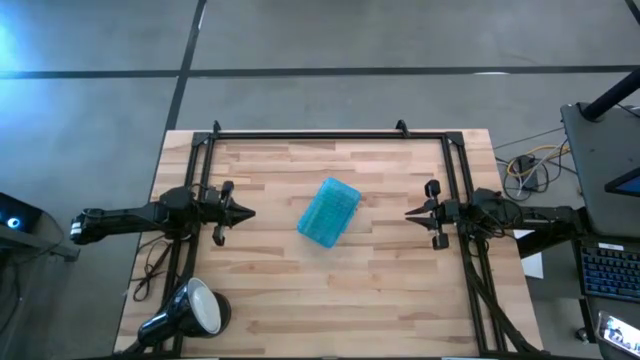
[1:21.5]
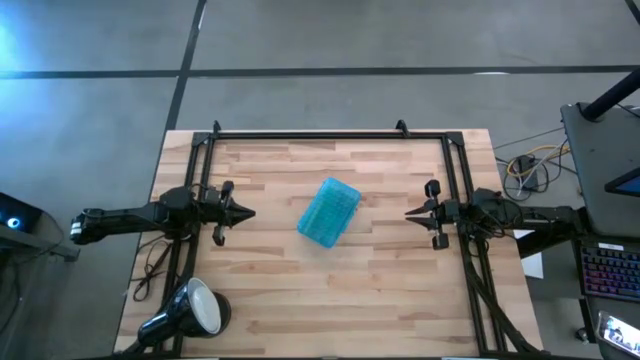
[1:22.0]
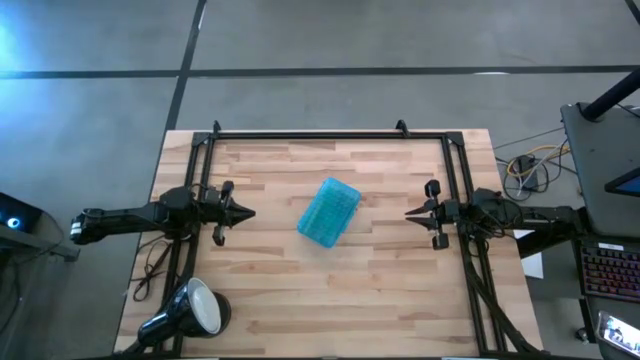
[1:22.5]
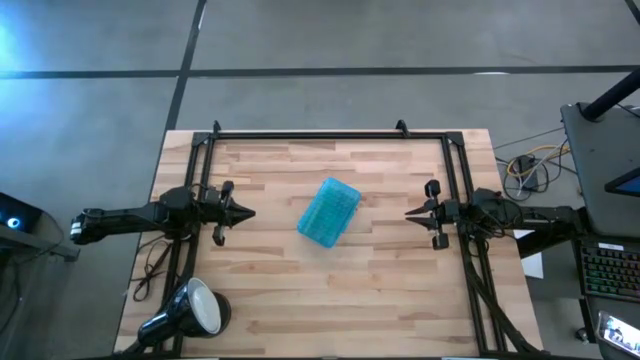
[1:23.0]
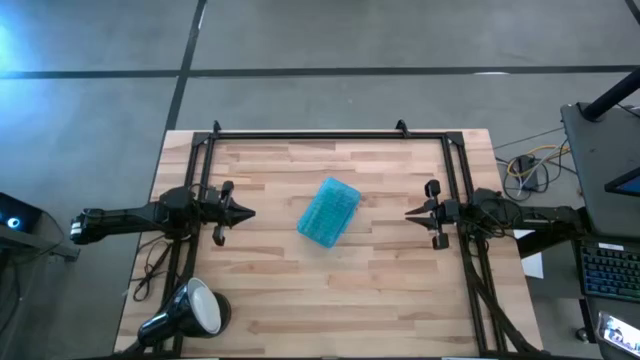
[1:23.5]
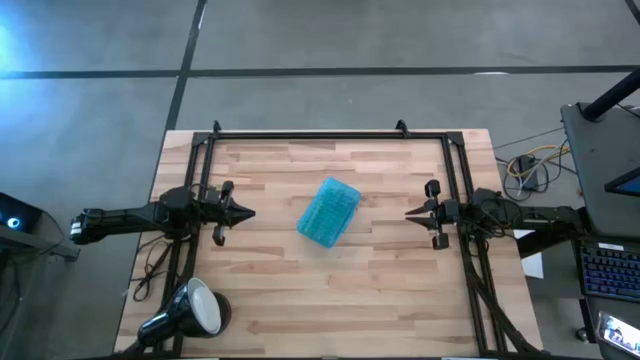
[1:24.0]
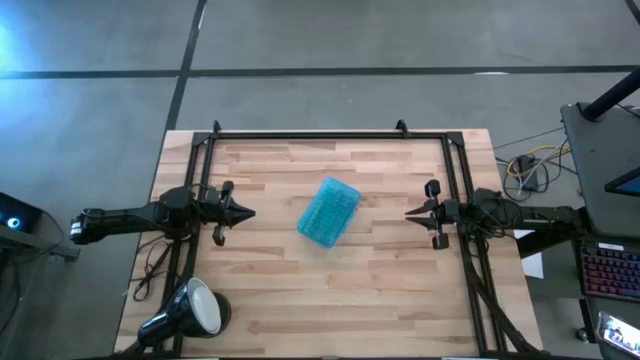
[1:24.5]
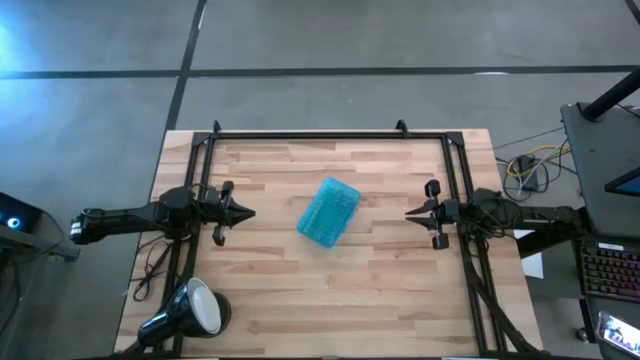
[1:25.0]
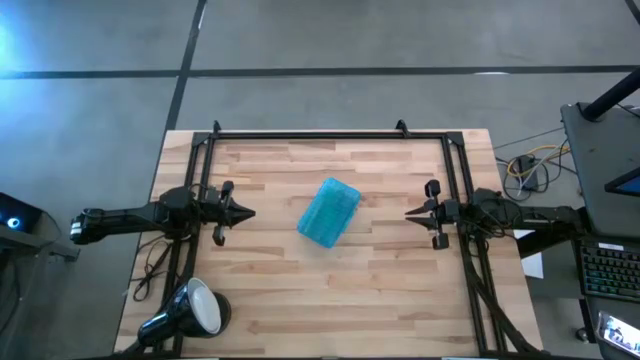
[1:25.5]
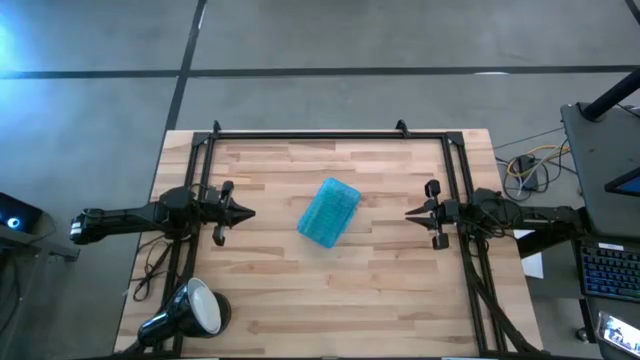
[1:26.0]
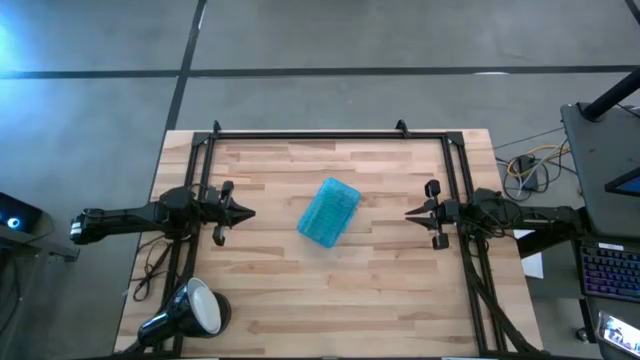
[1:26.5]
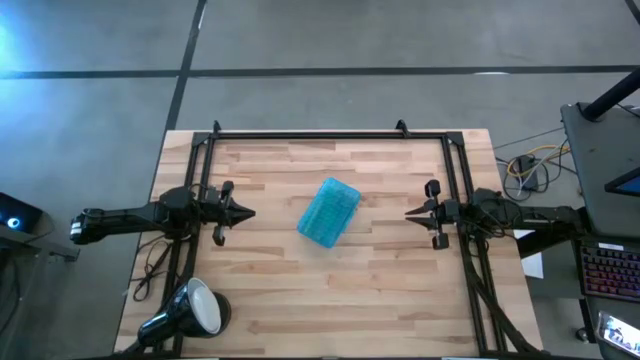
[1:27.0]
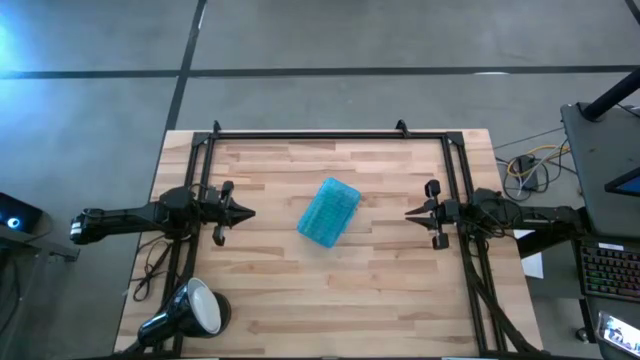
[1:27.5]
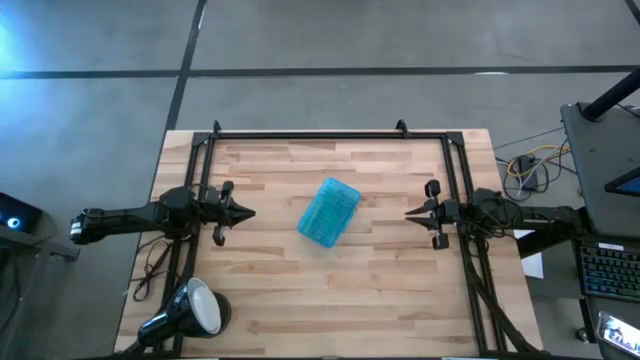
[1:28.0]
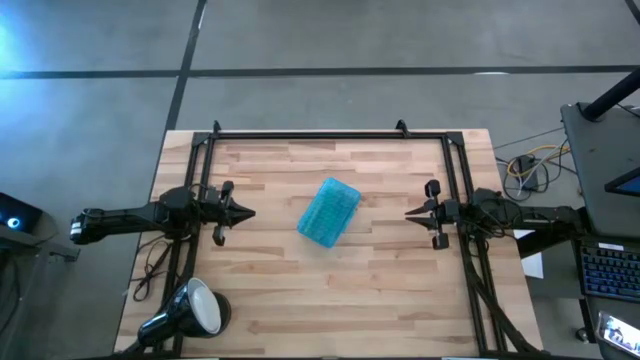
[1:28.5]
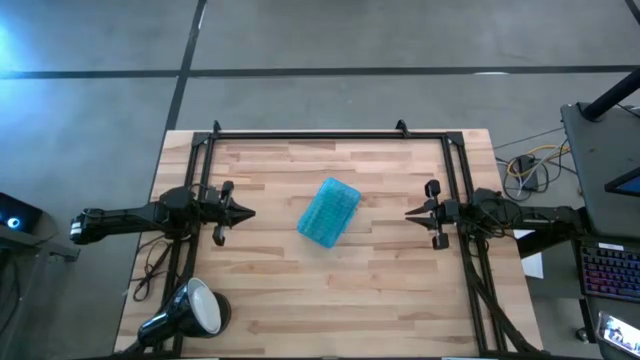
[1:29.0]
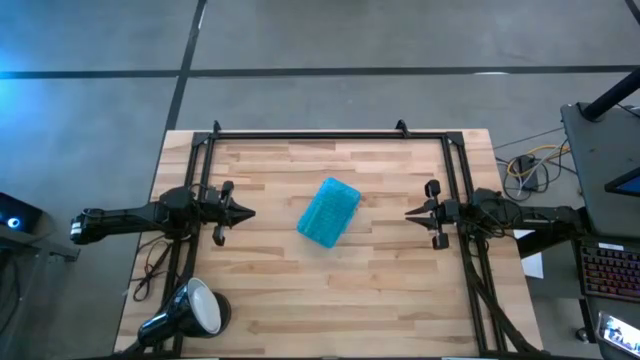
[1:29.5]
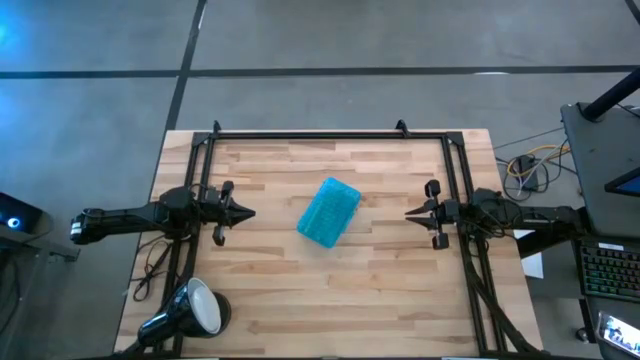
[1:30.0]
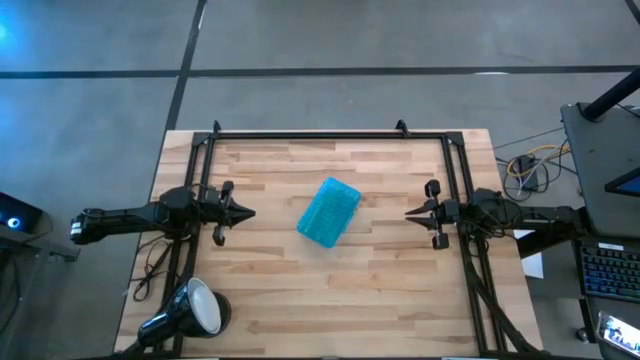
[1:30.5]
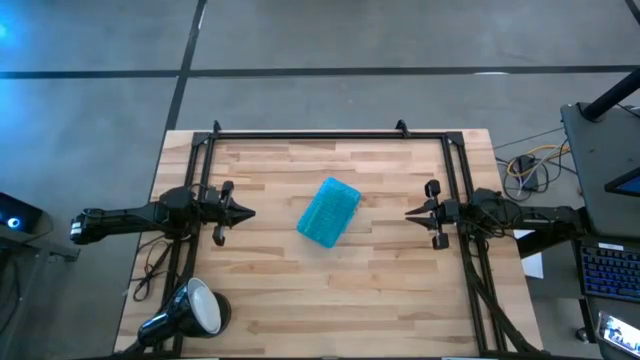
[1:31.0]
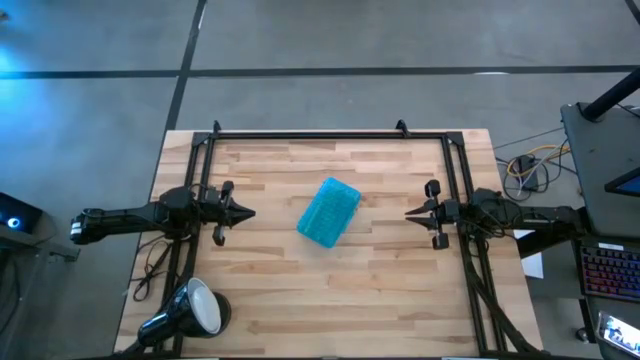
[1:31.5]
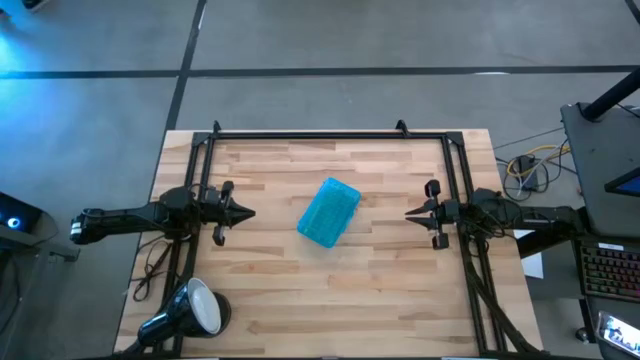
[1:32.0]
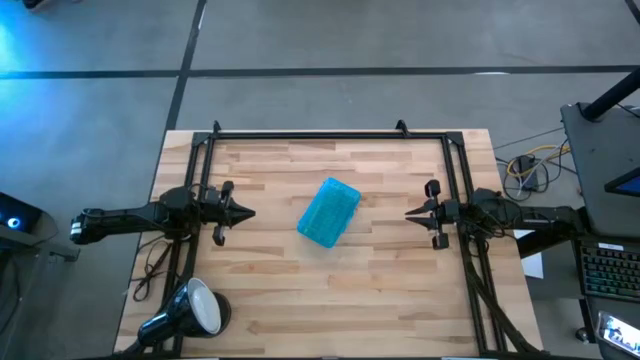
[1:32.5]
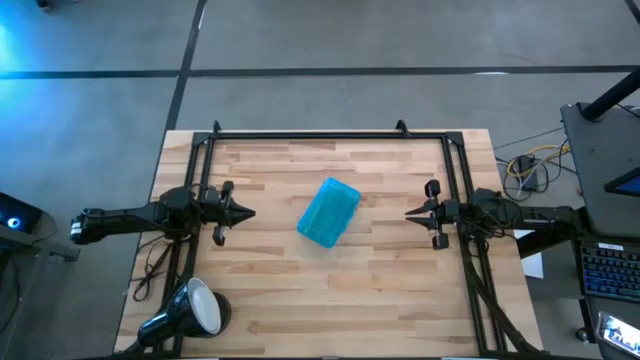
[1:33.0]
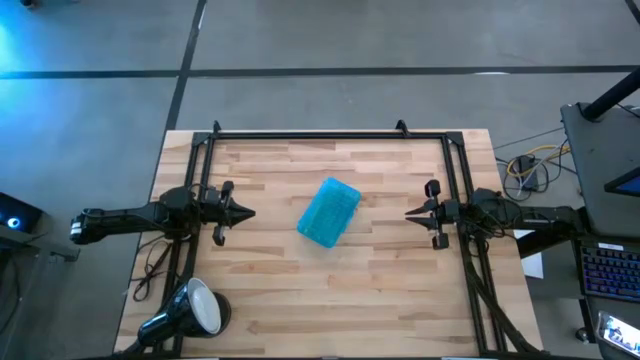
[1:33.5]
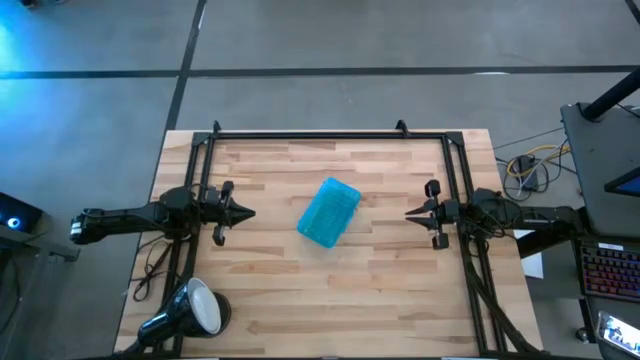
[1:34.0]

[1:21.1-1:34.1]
Task: Pick & place school supplies into a supply box
Return to Home Position

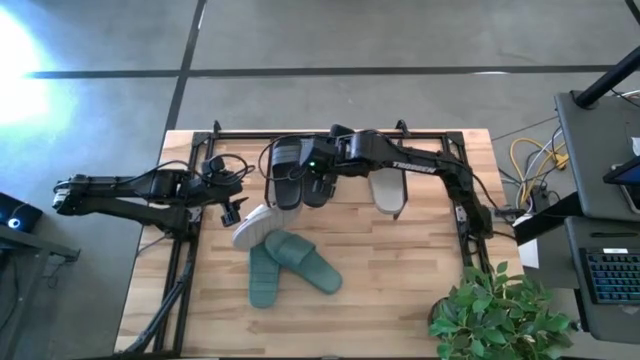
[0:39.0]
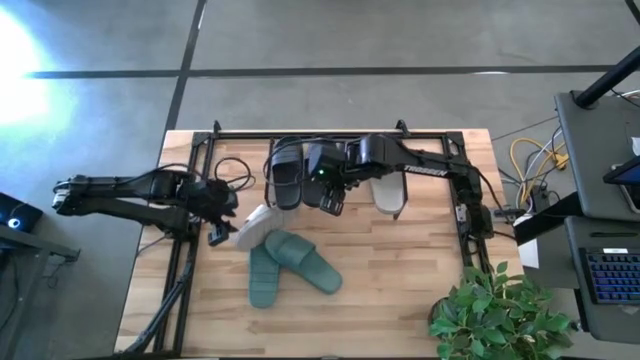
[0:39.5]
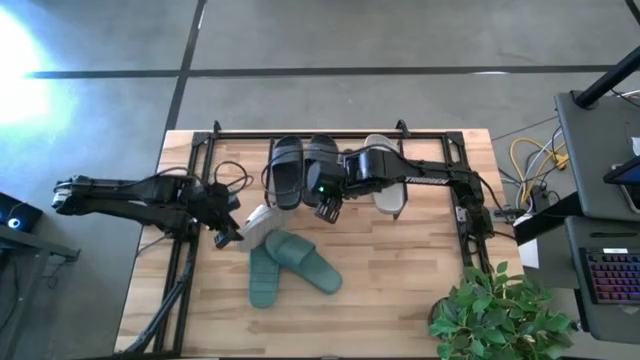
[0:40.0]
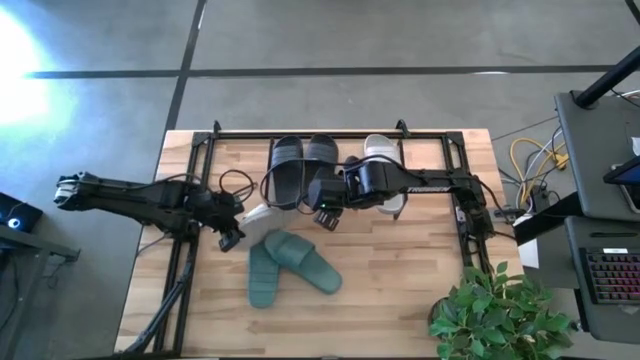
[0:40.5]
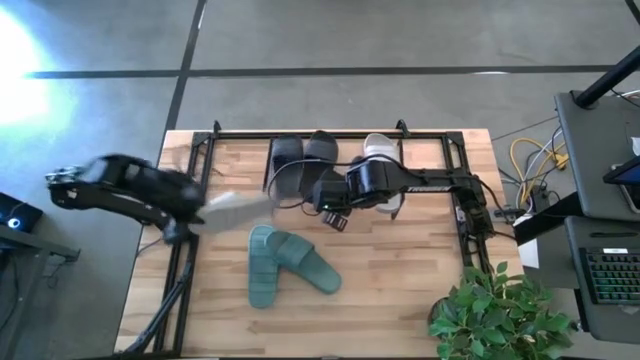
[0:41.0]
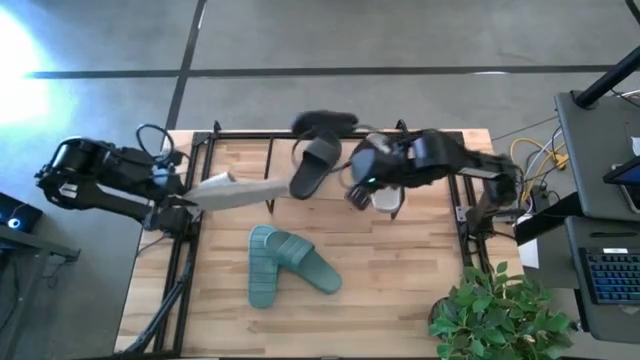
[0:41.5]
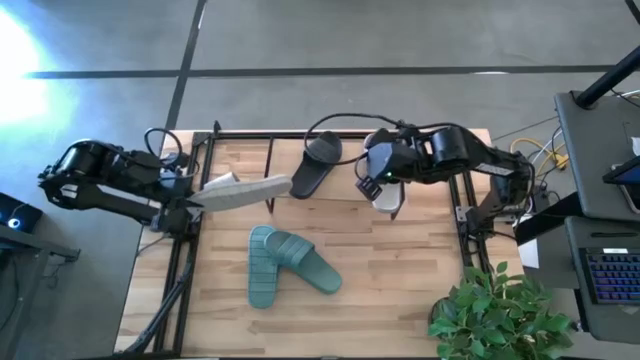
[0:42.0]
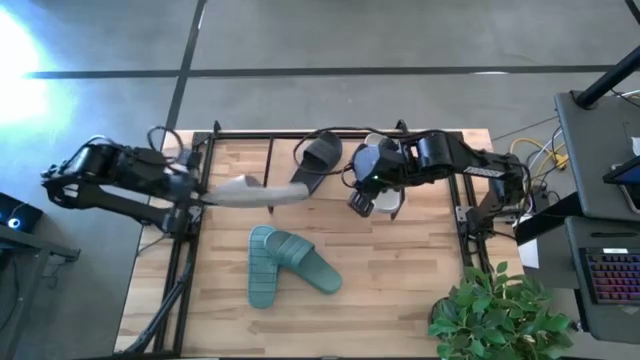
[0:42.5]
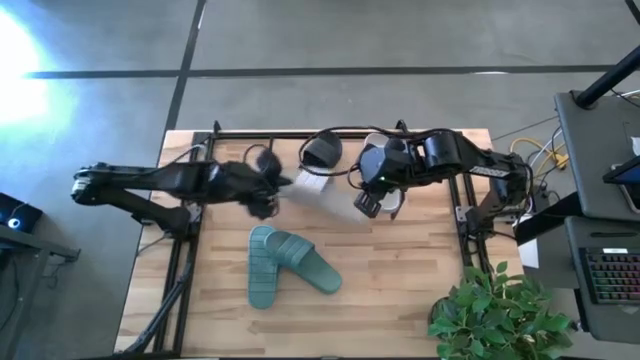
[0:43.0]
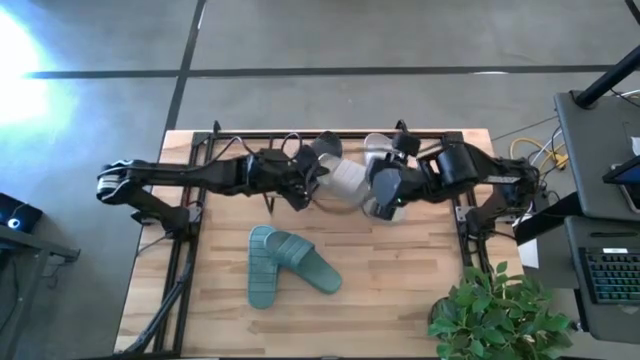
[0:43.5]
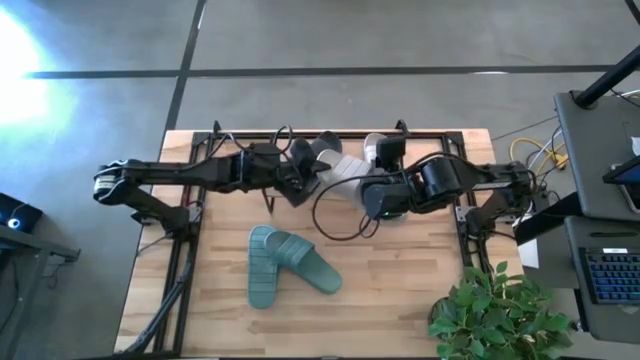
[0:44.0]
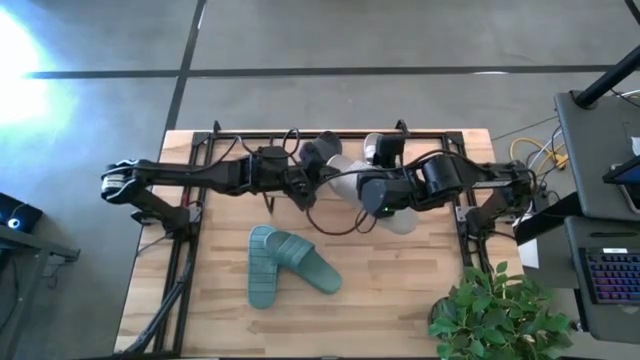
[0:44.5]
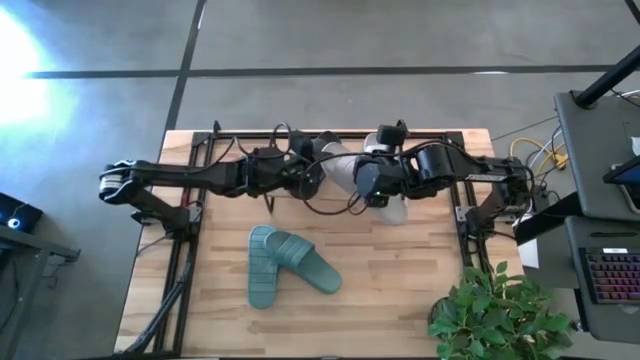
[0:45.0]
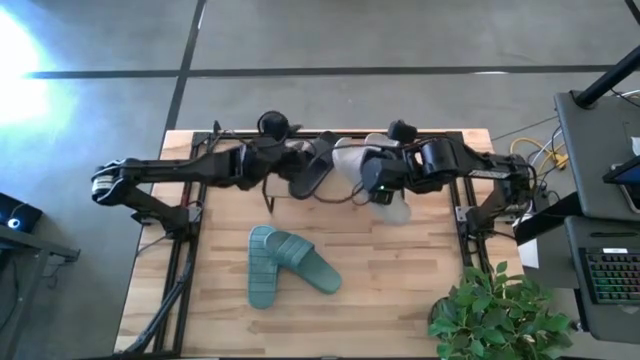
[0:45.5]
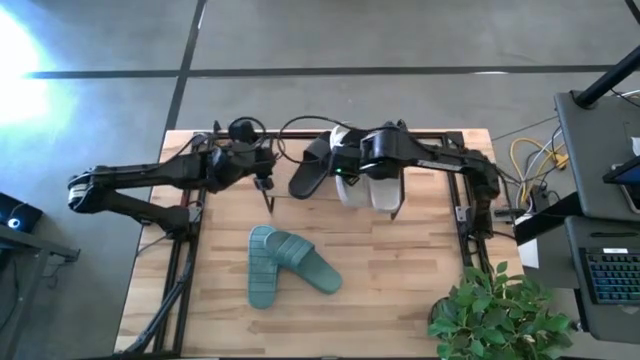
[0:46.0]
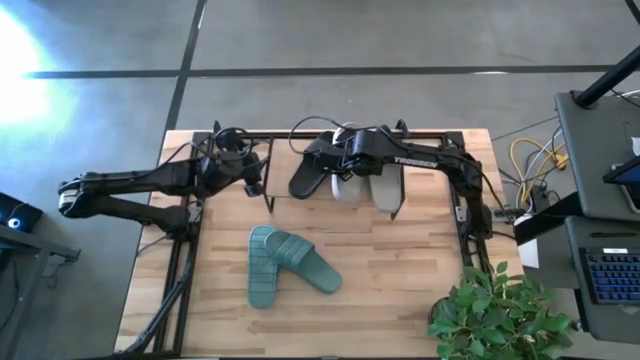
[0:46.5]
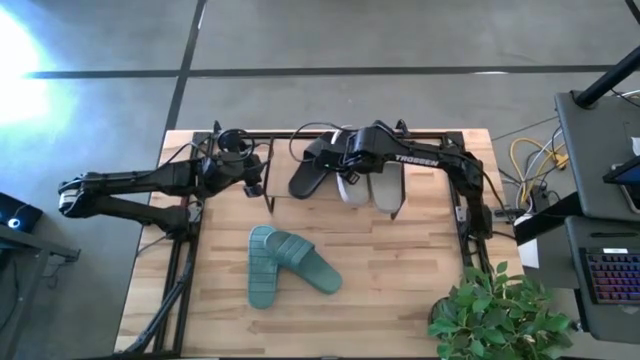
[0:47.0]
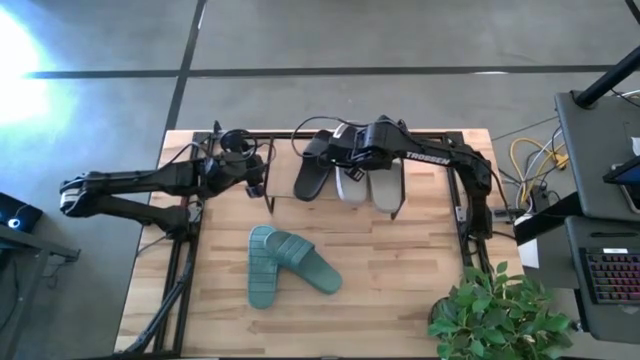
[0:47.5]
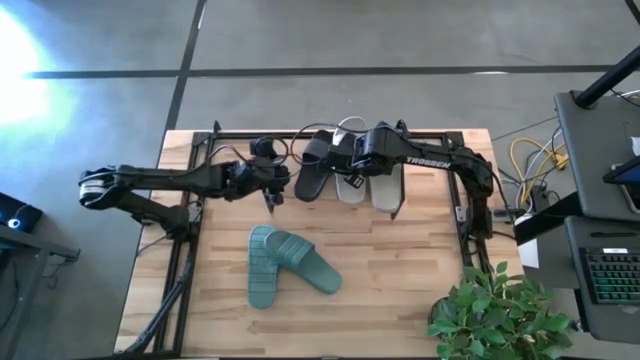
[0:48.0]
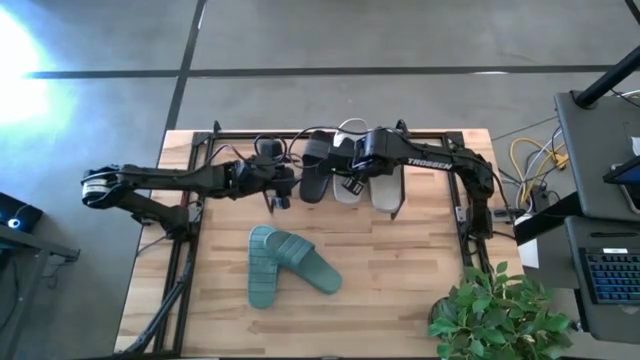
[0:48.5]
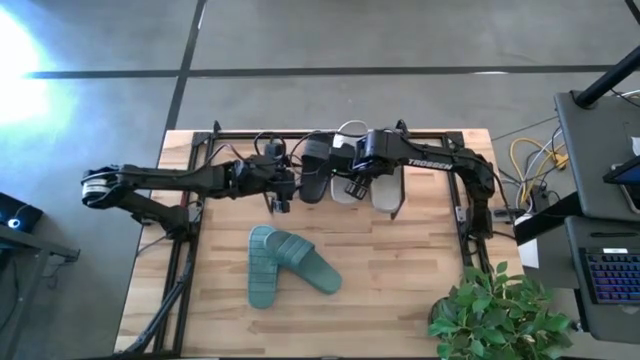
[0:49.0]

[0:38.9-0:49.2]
Task: Pick and place slides into the shelf
Put the gray slide on the shelf
